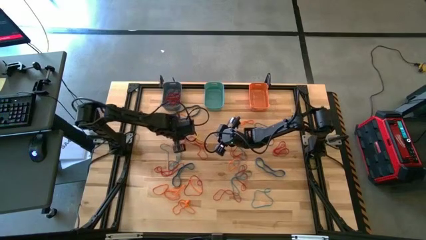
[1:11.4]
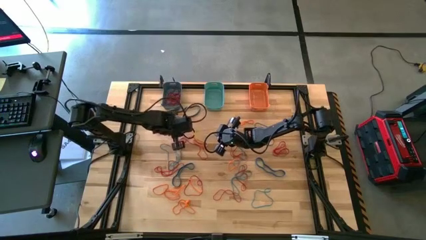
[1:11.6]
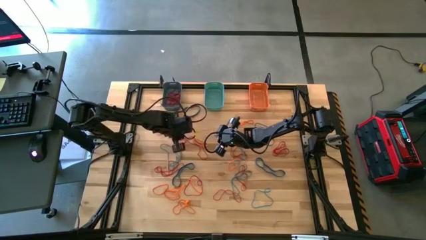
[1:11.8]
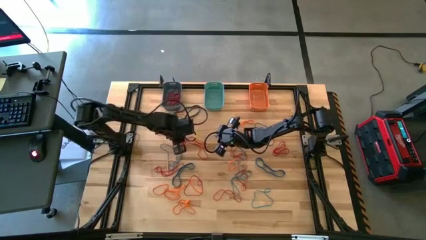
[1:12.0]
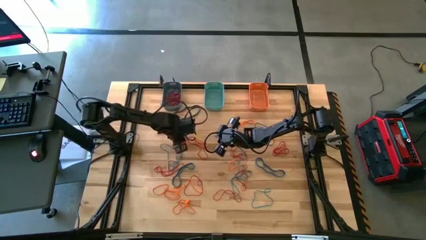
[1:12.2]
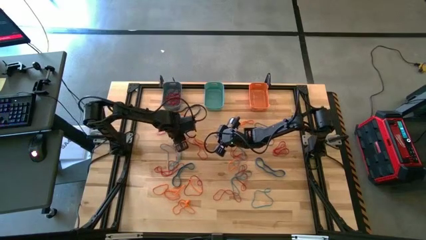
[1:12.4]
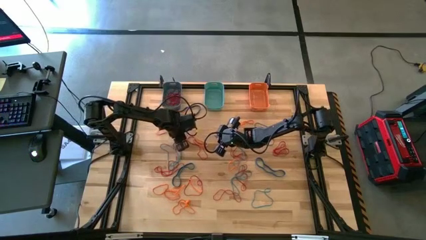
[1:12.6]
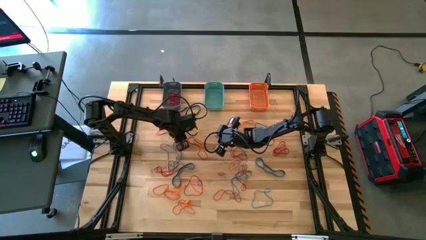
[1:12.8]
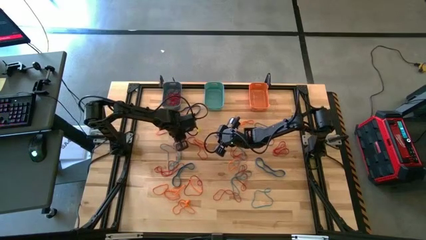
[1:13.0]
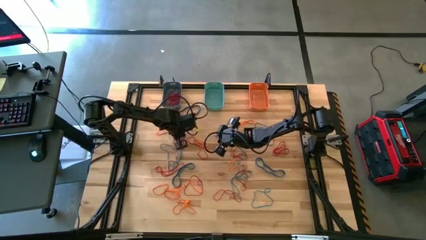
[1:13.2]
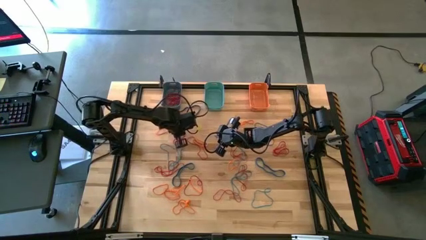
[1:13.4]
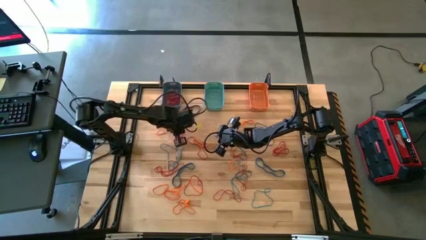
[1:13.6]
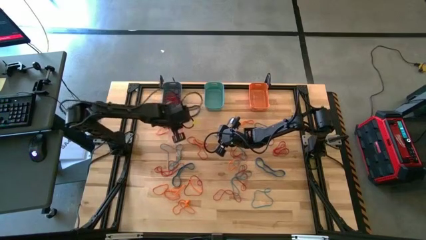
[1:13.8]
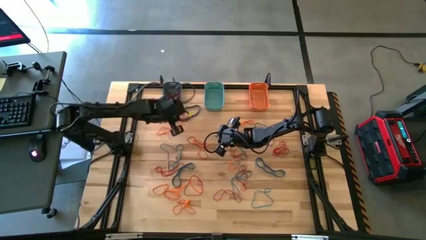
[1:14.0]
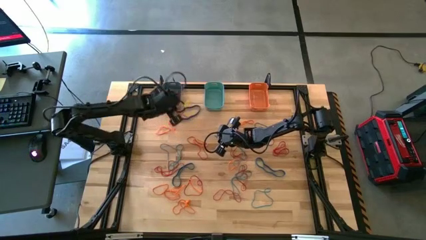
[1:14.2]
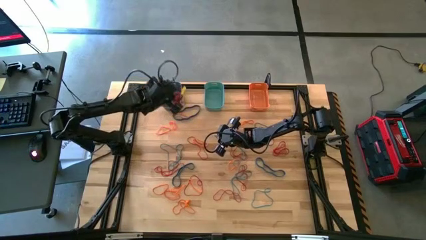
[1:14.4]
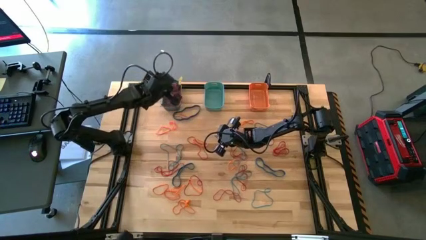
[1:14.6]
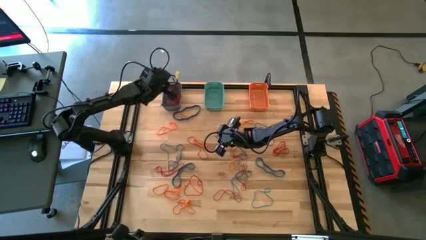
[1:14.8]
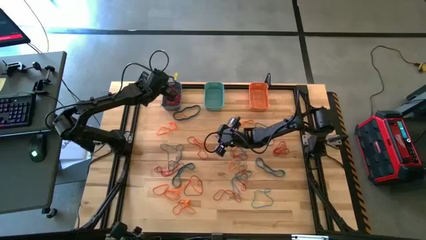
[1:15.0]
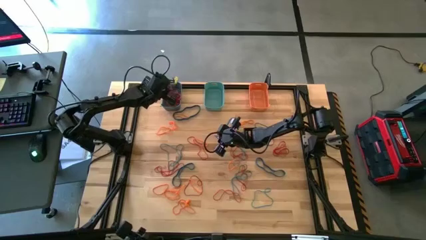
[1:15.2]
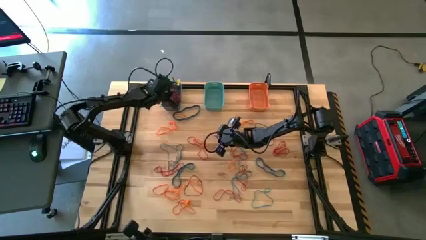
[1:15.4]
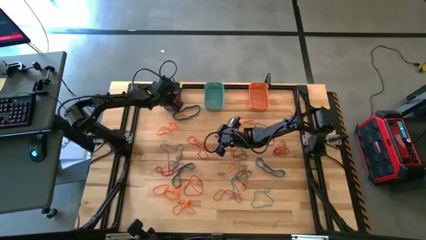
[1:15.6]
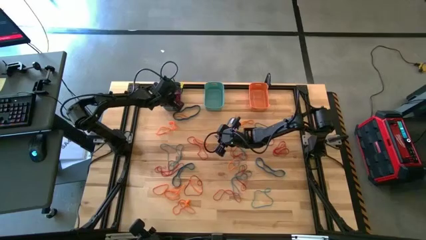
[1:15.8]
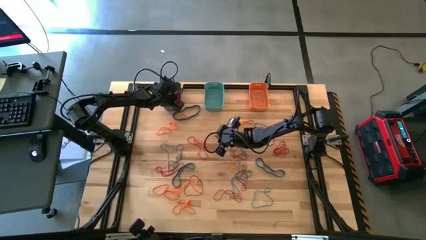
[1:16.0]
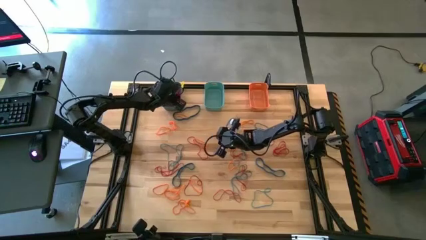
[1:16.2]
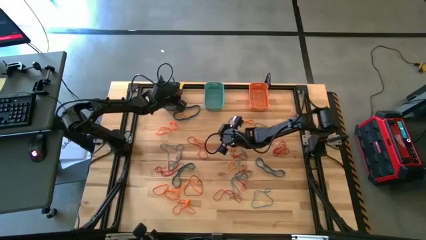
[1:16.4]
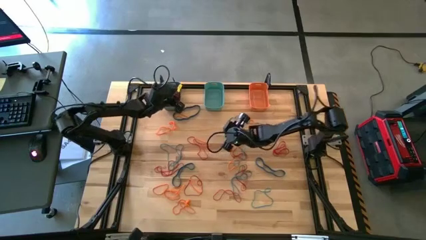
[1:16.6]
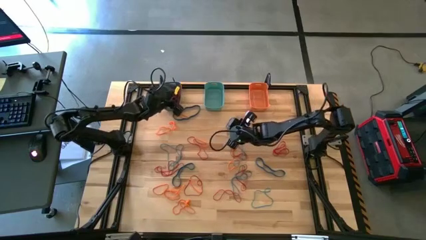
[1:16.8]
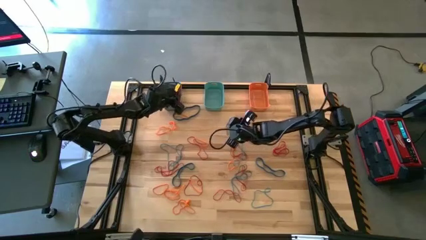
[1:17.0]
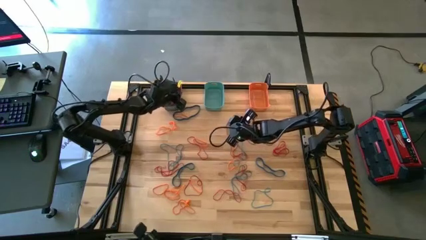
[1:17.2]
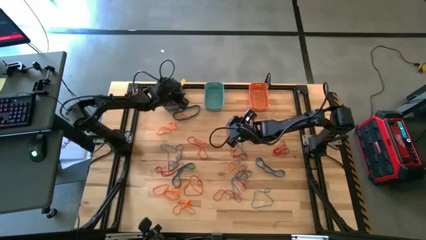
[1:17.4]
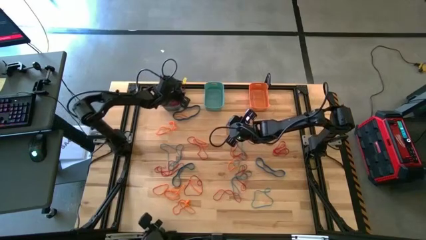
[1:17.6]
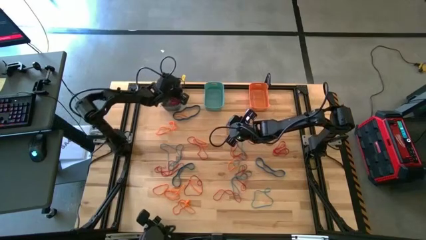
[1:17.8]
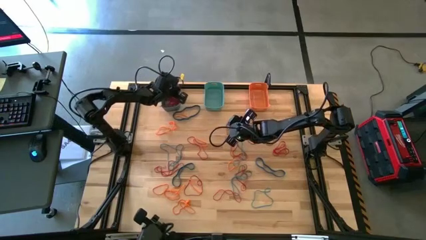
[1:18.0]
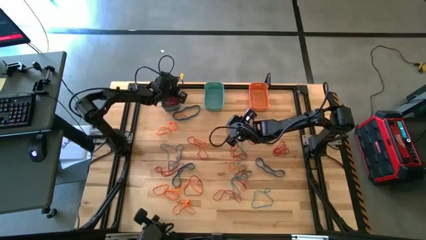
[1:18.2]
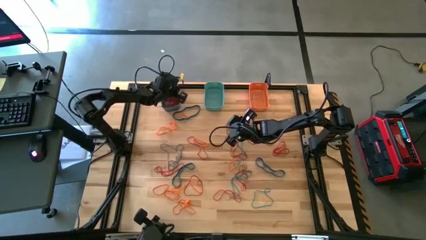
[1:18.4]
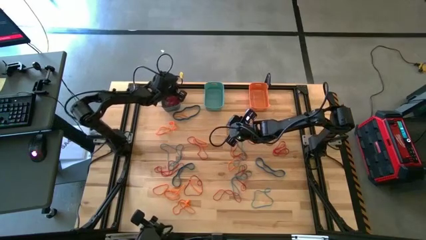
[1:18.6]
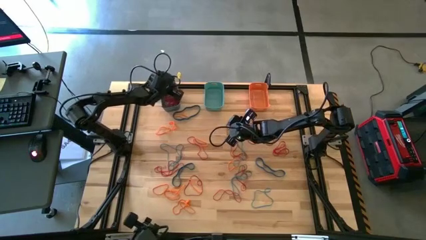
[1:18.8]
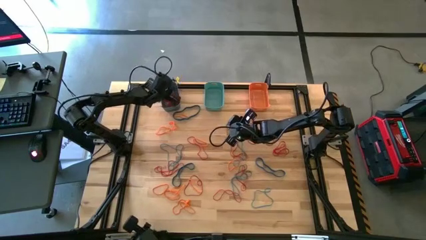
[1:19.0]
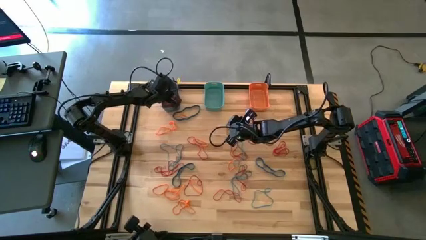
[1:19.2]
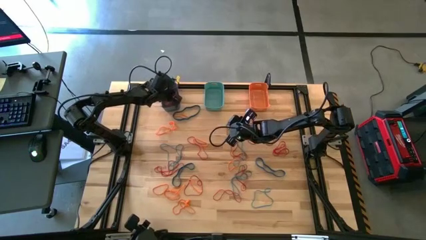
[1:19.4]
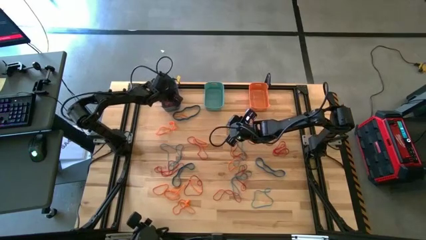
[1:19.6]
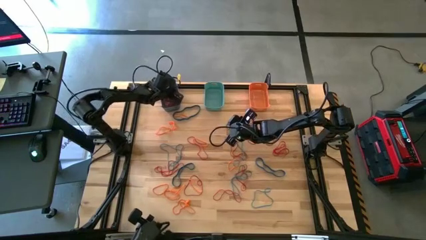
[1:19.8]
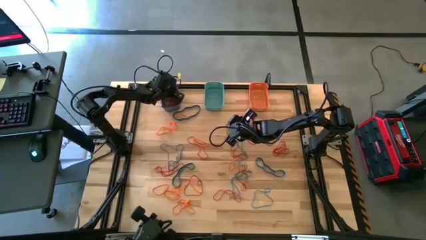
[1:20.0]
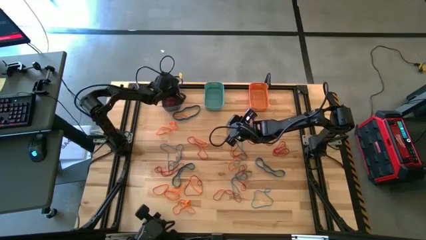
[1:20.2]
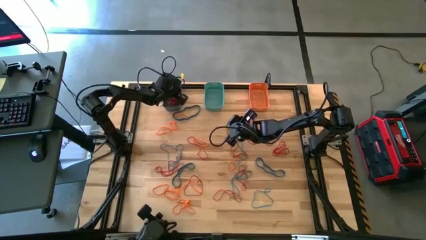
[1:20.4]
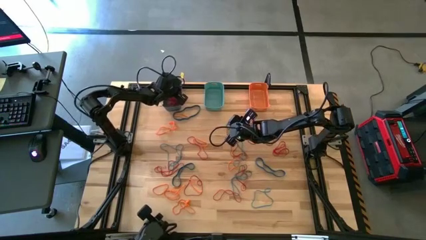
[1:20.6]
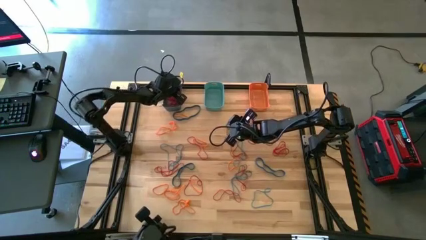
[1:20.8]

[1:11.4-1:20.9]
Task: Sort rubber bands into baskets
Put the red rubber band into the blue bin

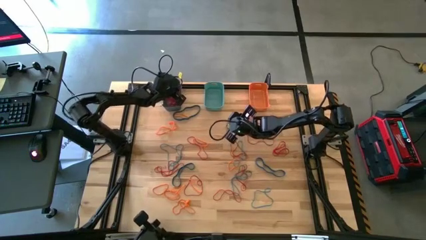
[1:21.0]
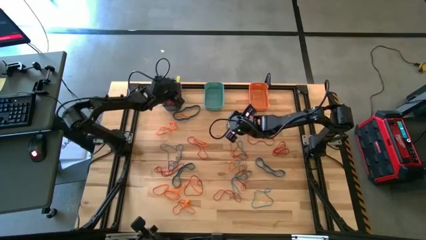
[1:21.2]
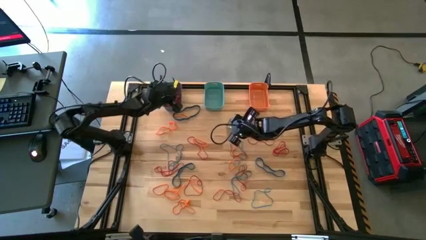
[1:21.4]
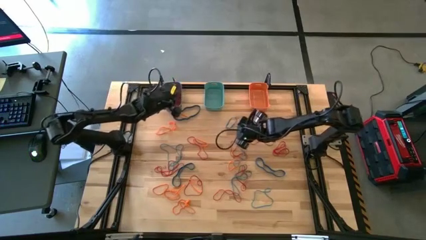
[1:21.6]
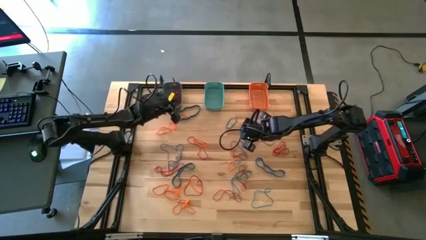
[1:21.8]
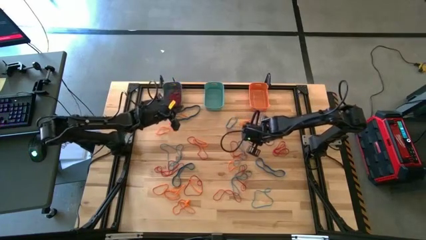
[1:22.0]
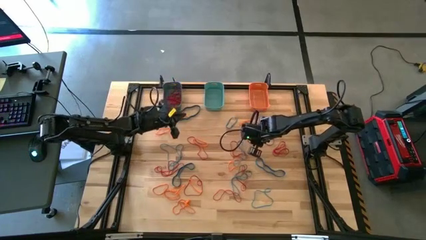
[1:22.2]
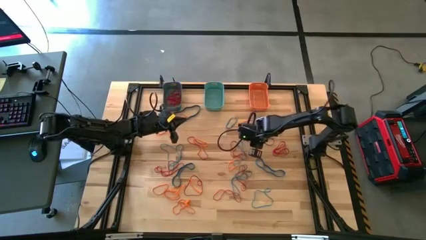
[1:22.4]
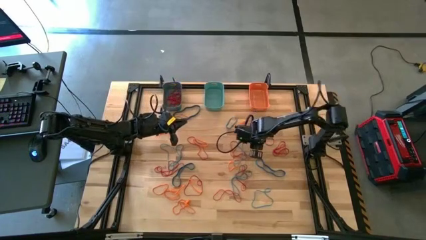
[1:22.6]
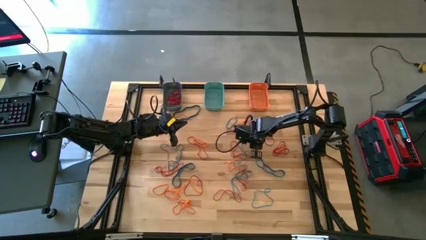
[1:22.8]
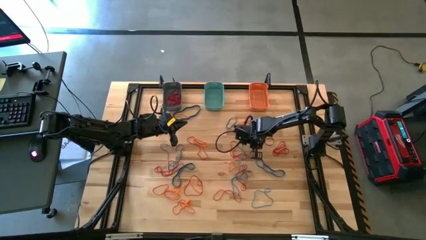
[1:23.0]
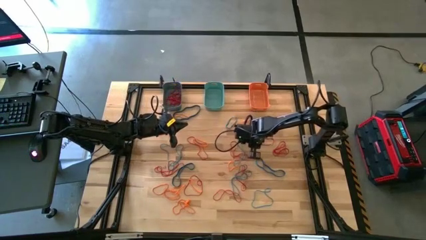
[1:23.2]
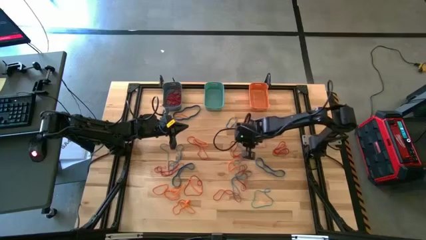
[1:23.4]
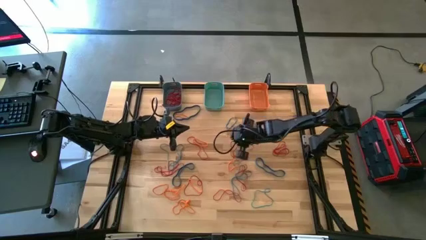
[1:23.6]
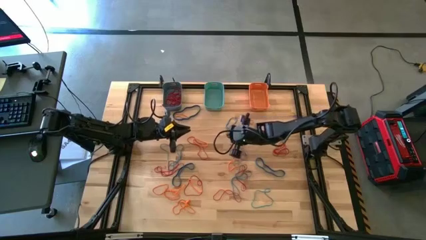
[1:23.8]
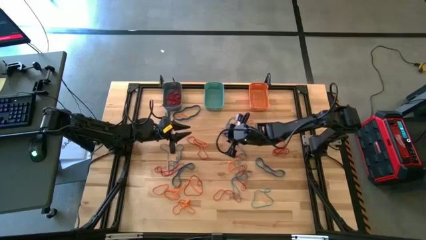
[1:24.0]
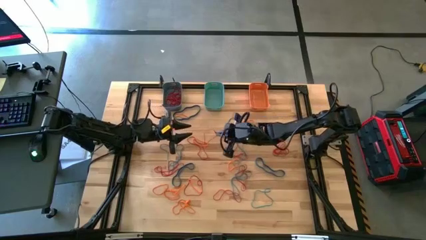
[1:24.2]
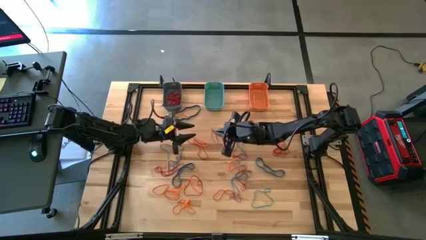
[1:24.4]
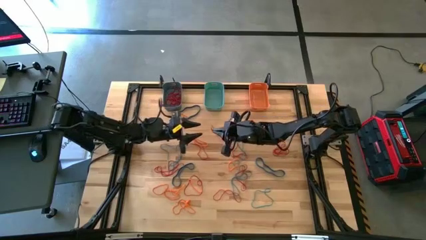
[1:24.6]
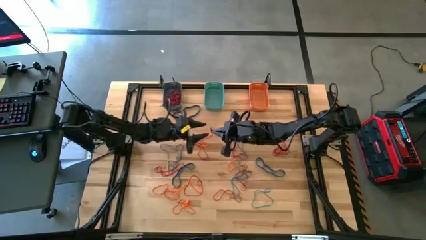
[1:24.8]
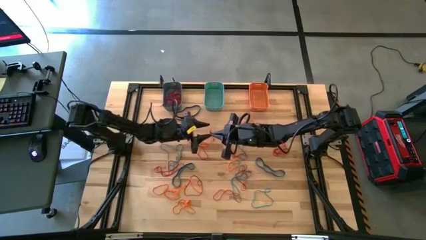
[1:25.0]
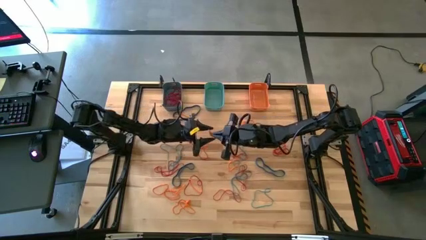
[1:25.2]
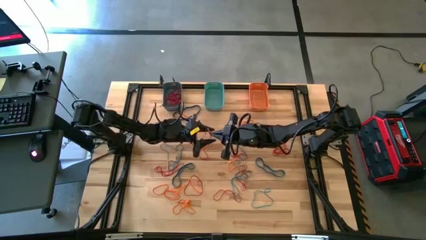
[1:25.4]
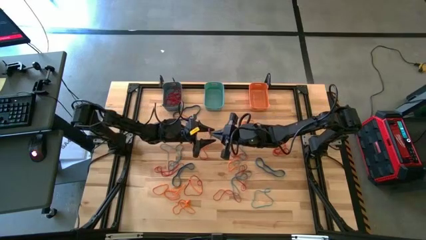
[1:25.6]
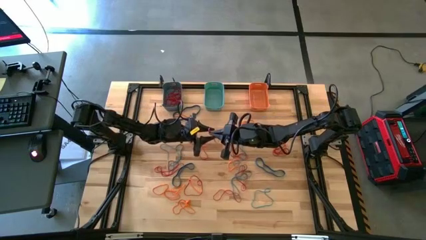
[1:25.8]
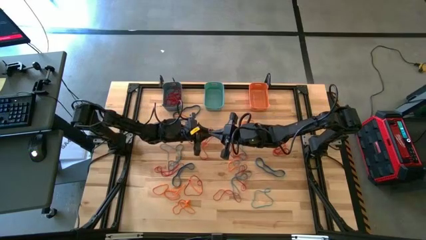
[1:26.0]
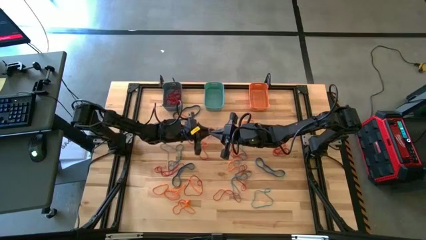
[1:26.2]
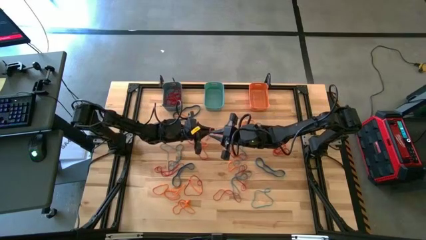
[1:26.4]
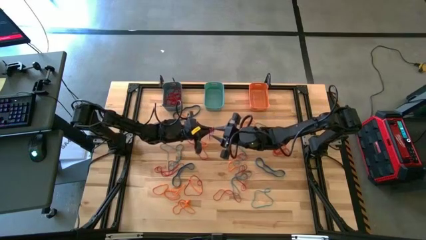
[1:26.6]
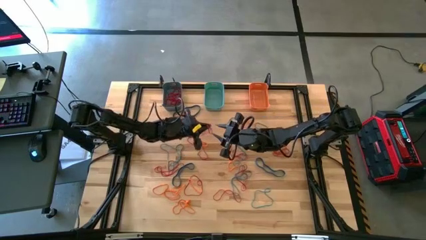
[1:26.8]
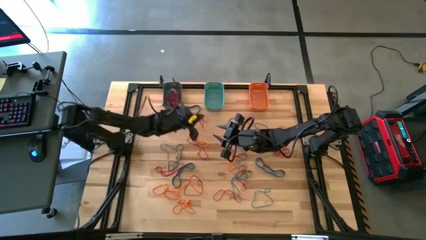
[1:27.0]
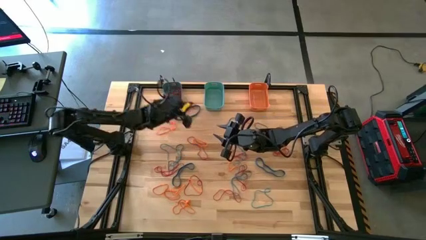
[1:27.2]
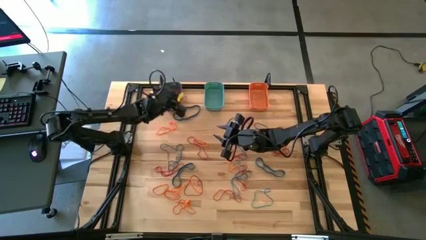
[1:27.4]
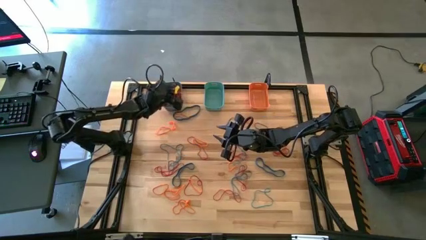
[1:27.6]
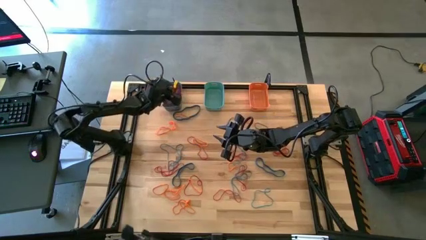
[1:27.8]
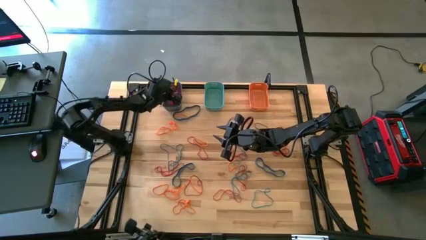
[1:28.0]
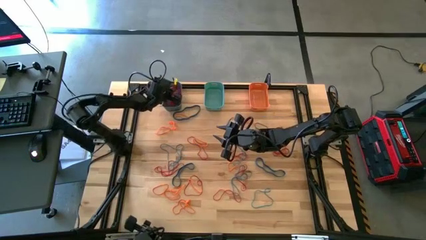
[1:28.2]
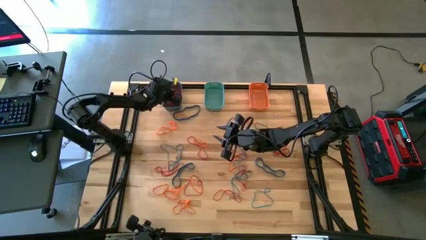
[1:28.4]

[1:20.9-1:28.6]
Put the red rubber band into the blue bin
